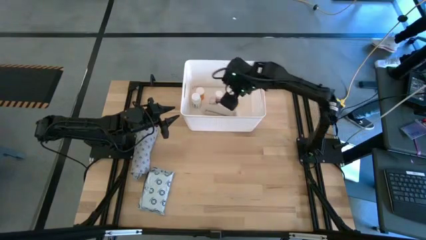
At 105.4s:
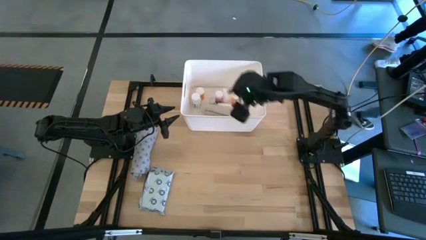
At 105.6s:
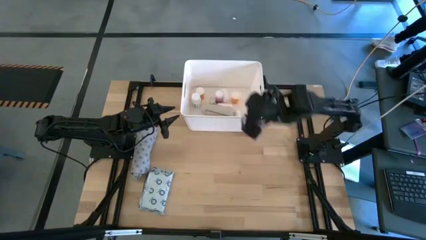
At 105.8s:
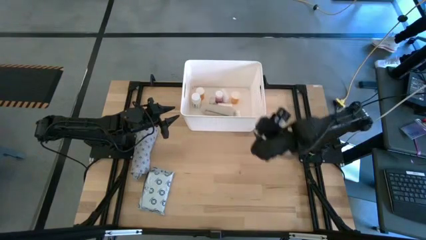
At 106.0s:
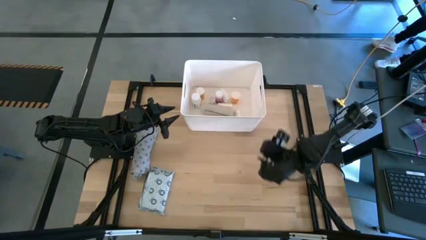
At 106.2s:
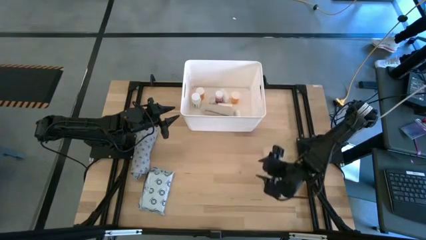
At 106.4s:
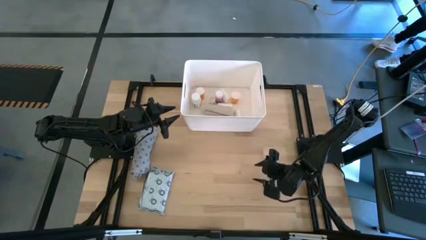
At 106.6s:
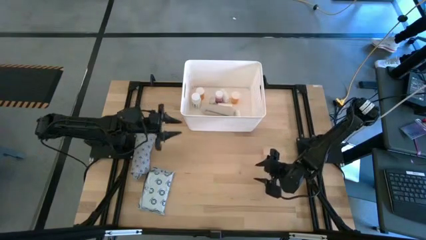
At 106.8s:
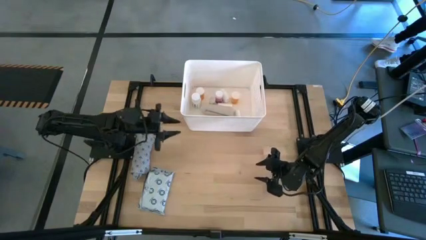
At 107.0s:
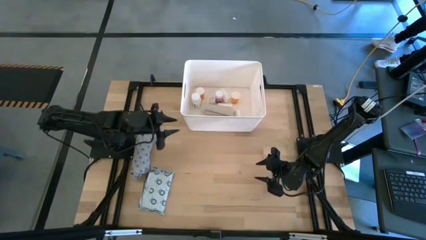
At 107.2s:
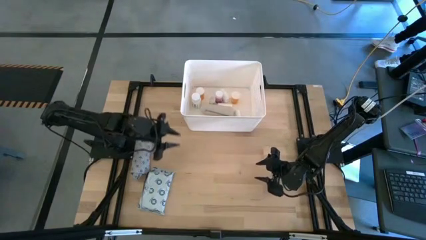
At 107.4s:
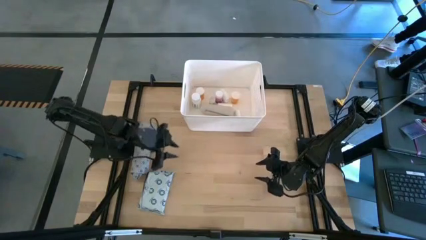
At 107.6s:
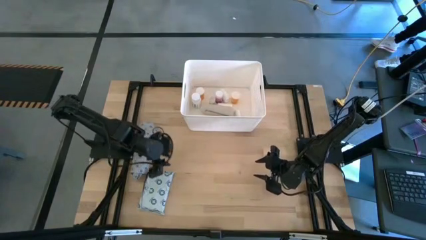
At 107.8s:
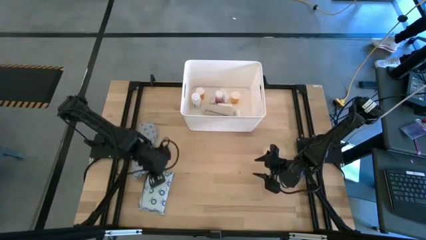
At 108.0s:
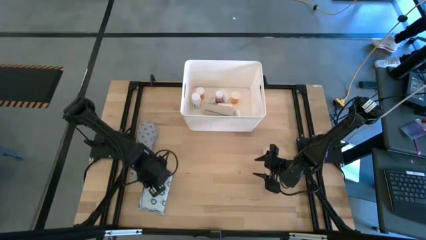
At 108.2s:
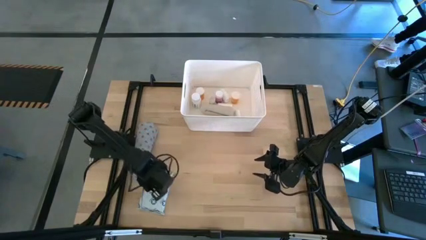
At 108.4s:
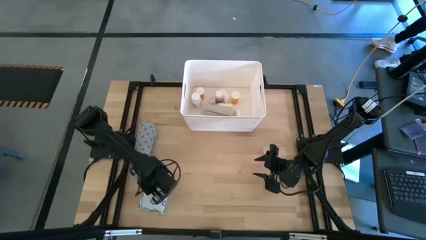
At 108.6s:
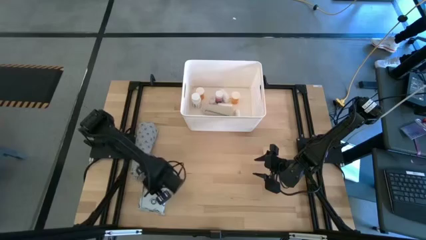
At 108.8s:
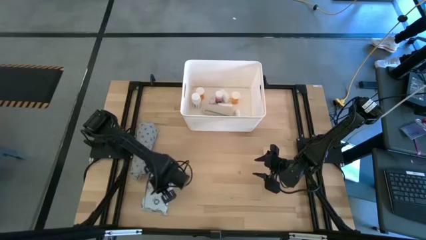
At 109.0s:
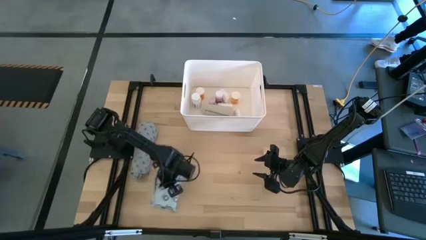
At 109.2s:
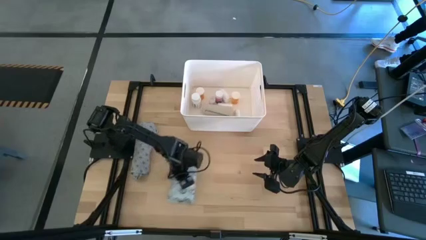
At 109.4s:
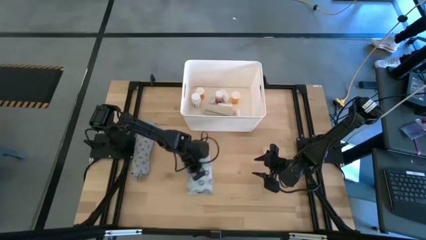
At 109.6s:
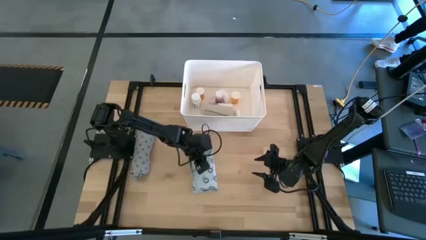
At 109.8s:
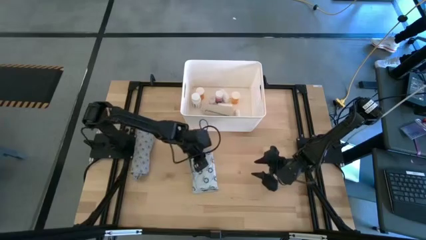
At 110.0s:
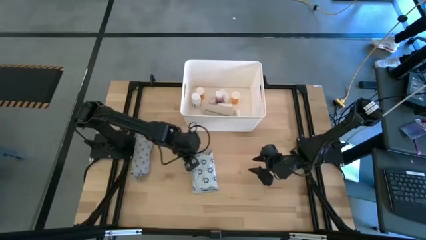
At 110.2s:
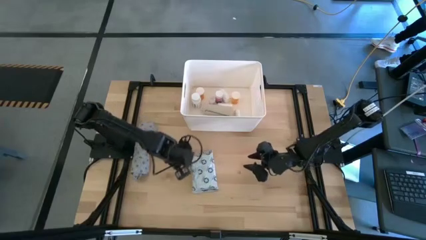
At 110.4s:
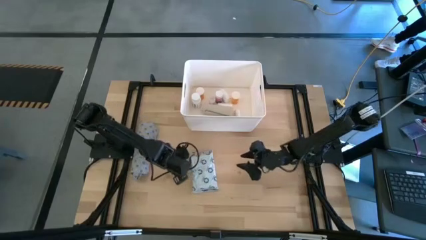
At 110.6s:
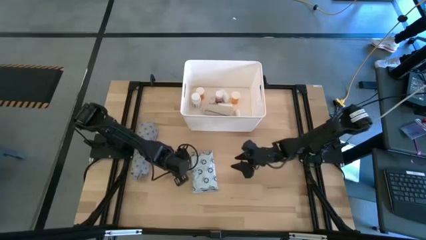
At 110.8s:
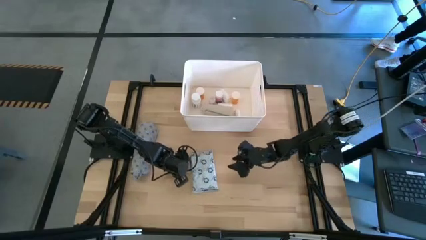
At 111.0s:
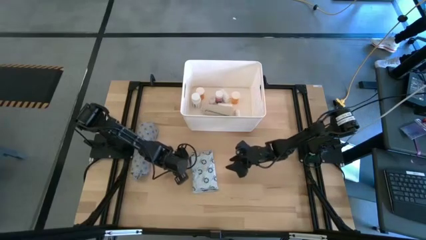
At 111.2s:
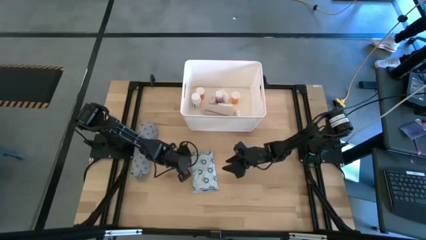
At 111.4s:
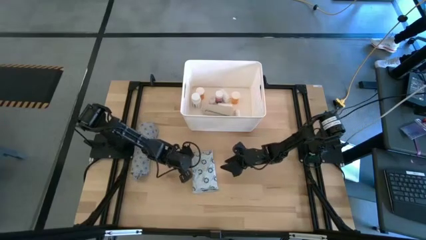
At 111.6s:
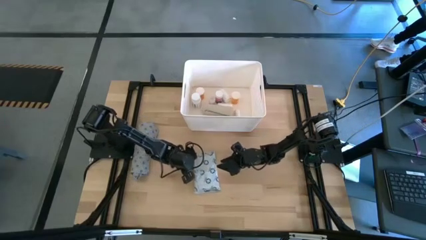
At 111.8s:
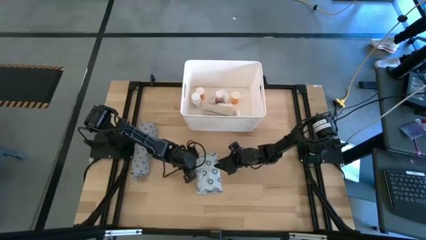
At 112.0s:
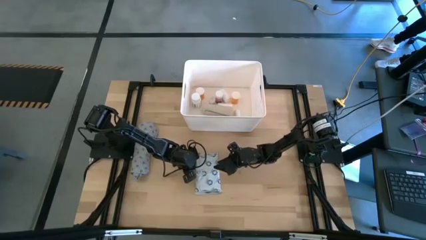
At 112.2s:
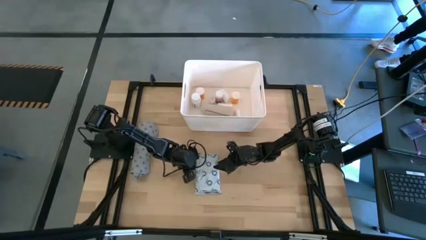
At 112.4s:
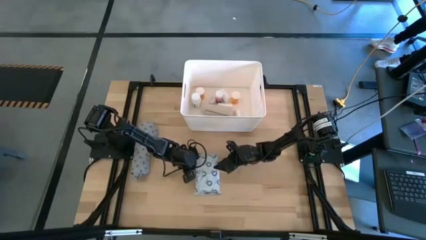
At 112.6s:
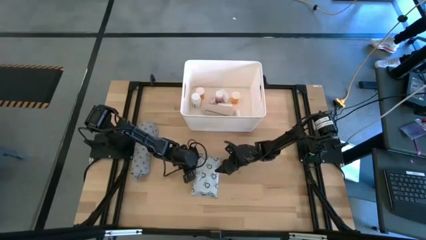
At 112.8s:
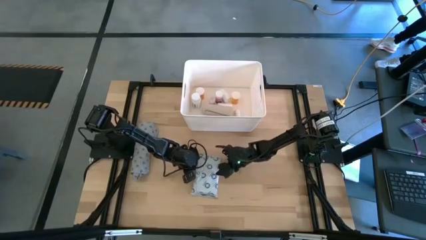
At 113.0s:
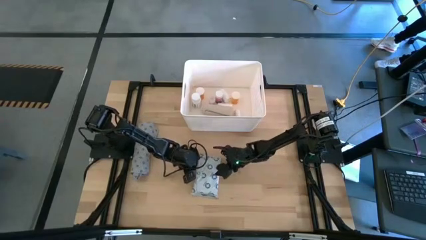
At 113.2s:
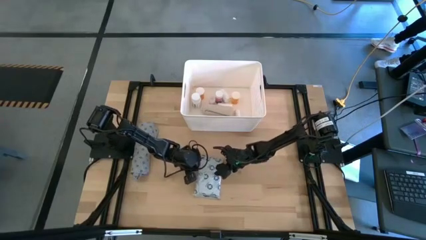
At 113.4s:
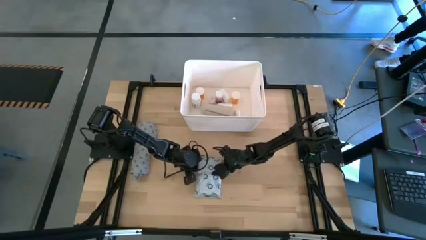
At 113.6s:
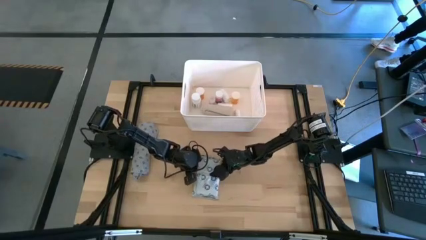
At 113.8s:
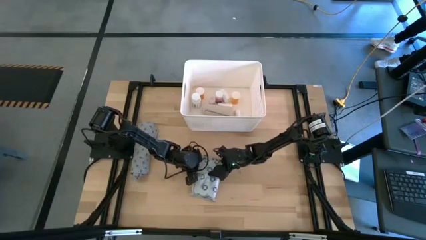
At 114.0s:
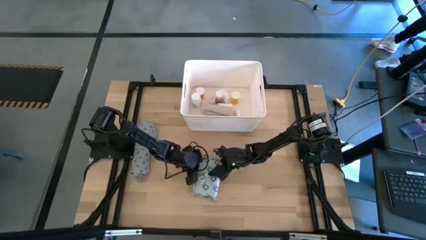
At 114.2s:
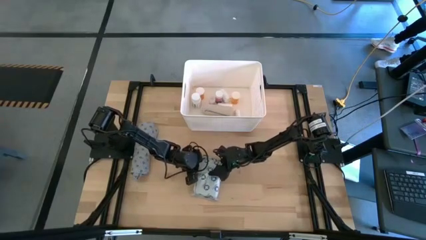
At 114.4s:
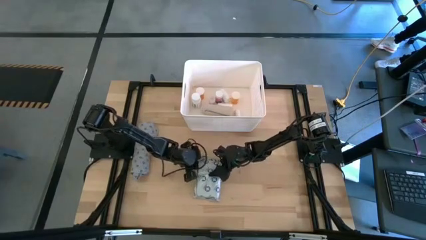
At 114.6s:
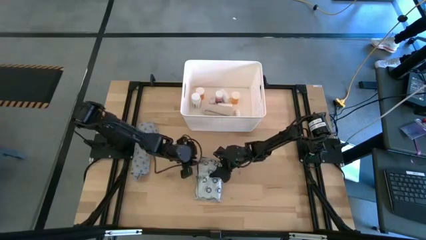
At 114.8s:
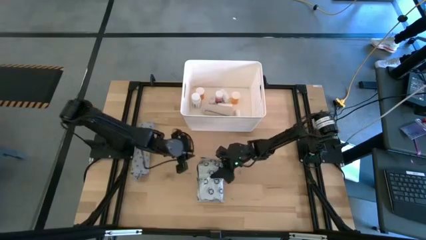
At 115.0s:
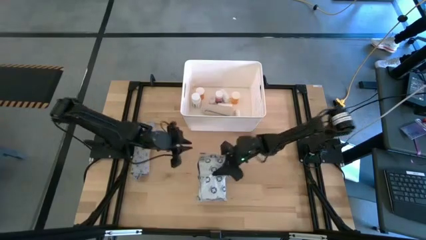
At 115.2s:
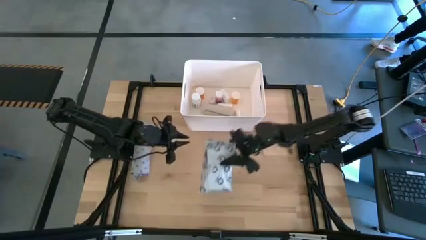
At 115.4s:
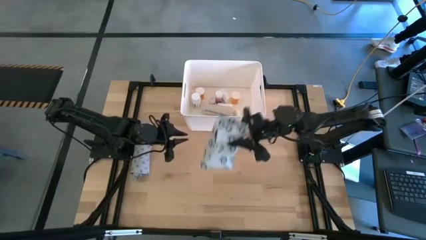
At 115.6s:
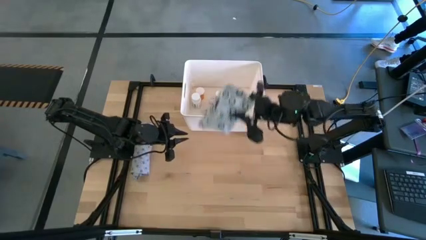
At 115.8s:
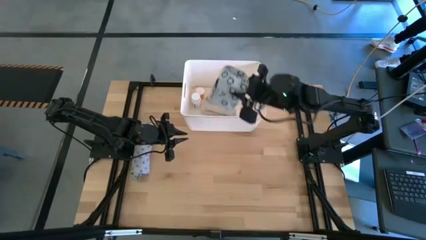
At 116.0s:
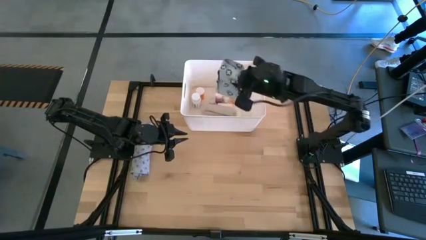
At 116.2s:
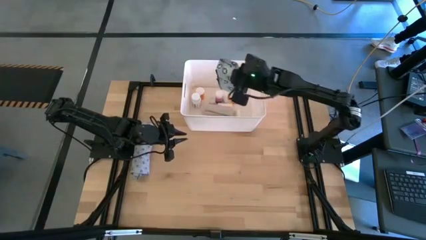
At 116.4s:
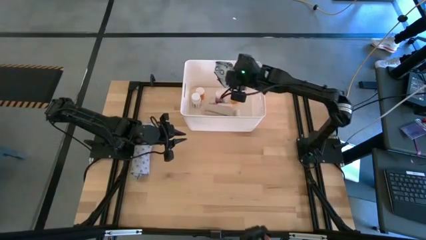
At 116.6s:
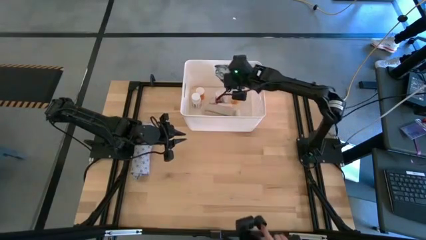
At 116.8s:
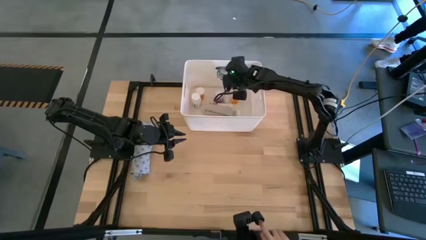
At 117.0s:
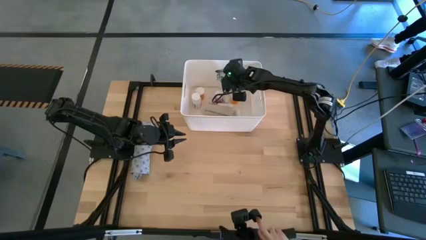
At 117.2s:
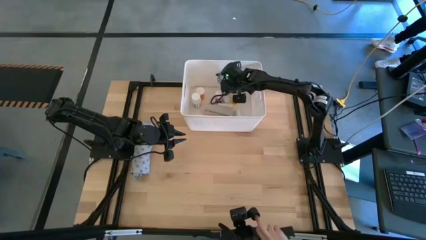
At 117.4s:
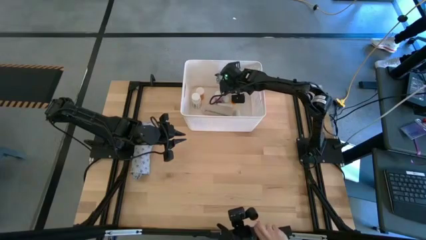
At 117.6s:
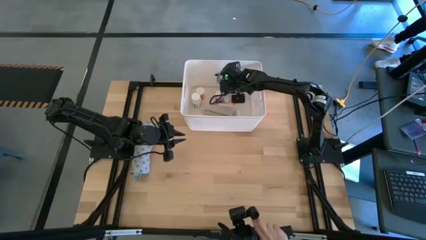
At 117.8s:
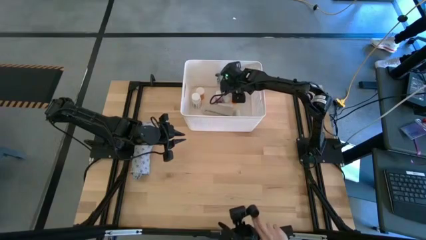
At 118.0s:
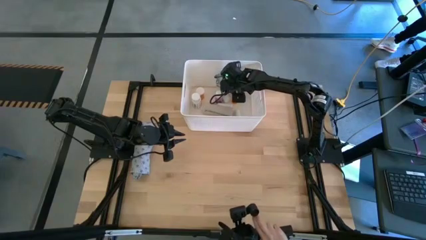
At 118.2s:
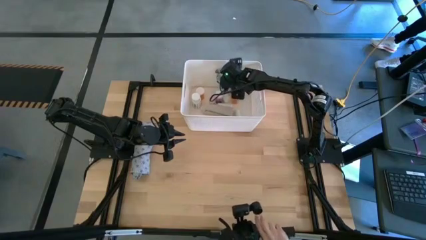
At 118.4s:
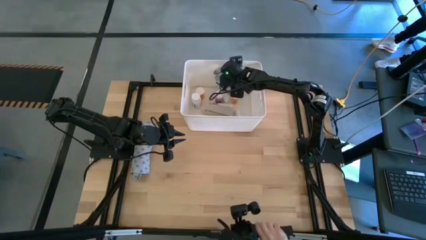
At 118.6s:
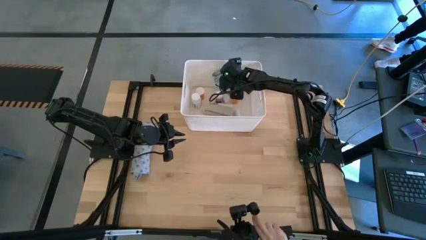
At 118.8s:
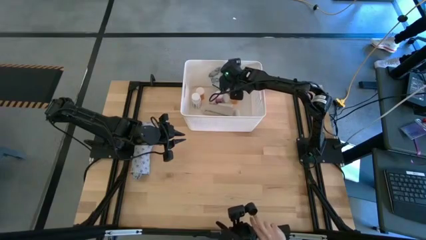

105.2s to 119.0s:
Task: Pick & place medical supplies in basket/bin
Put the white mailer bag into the white bin

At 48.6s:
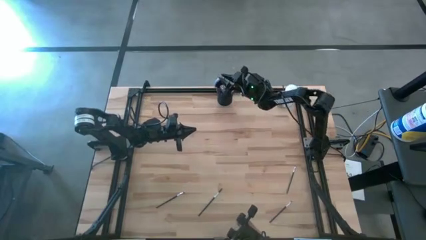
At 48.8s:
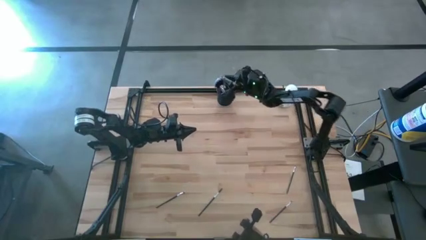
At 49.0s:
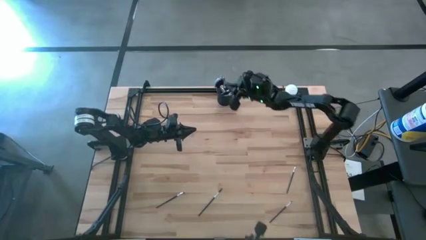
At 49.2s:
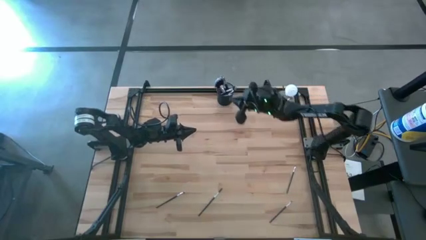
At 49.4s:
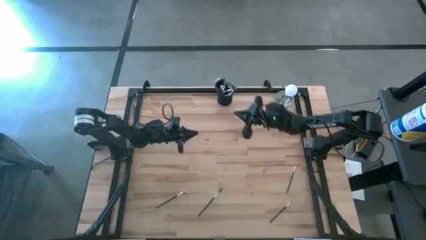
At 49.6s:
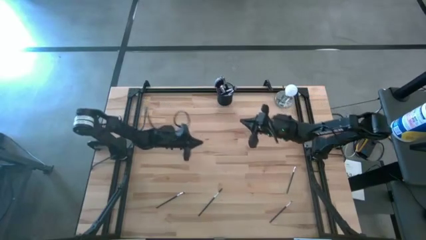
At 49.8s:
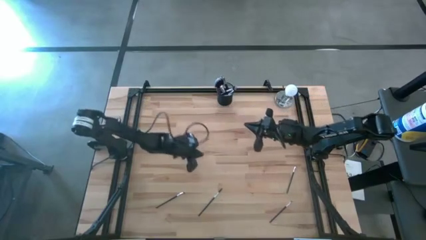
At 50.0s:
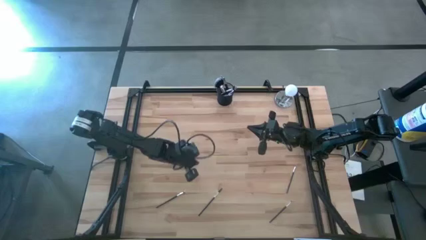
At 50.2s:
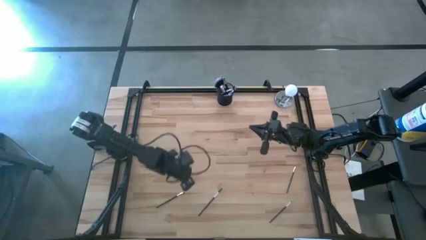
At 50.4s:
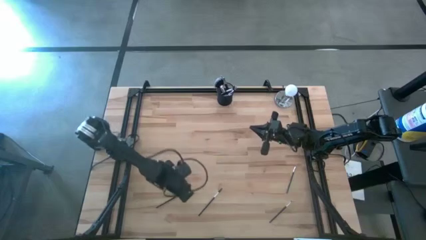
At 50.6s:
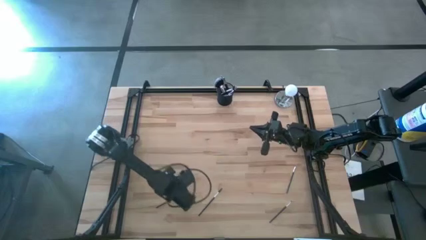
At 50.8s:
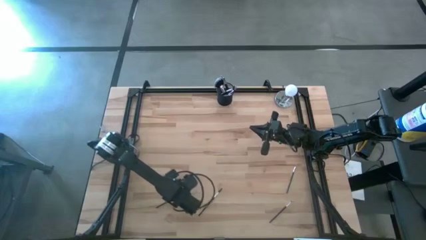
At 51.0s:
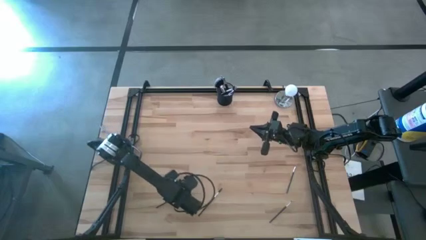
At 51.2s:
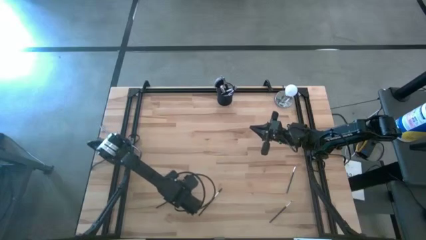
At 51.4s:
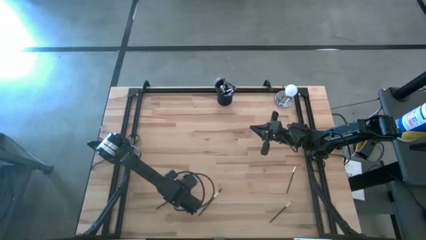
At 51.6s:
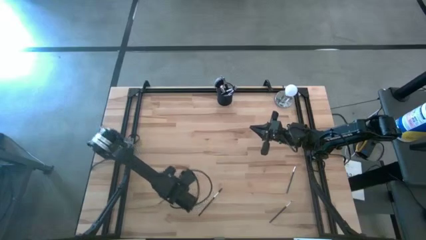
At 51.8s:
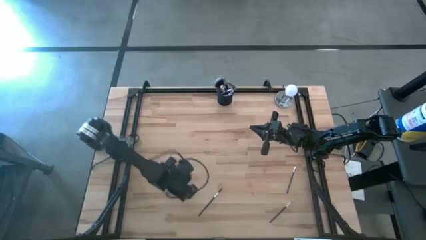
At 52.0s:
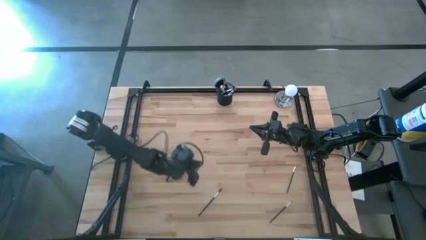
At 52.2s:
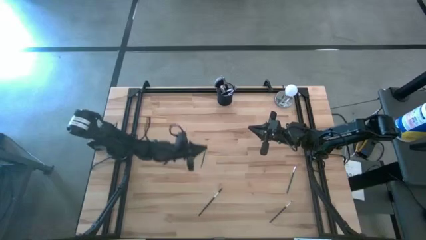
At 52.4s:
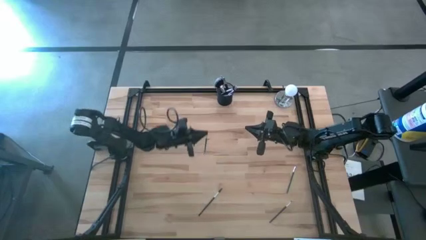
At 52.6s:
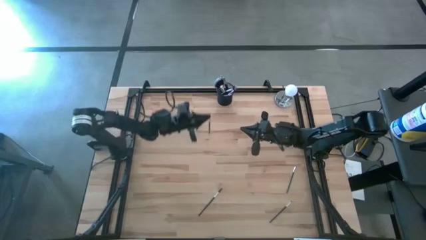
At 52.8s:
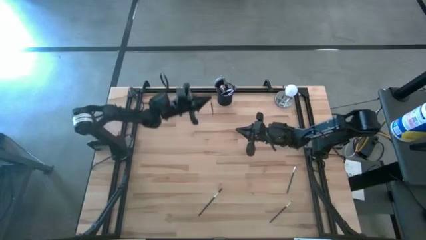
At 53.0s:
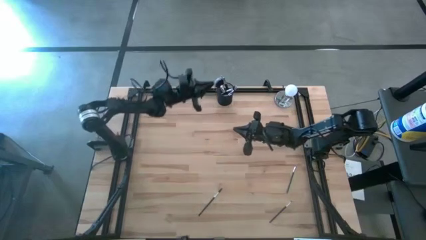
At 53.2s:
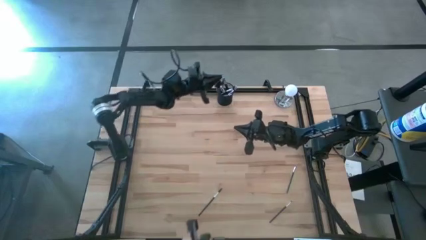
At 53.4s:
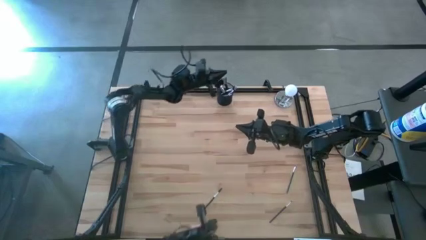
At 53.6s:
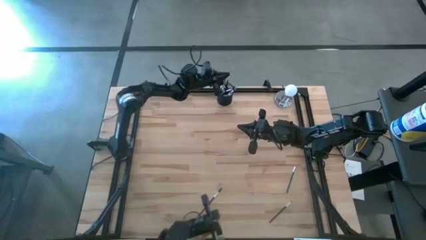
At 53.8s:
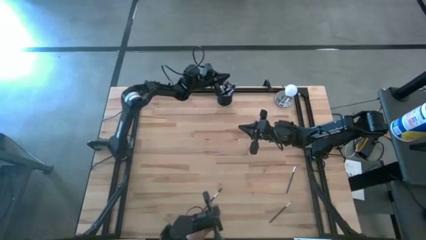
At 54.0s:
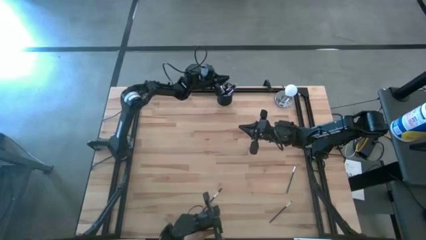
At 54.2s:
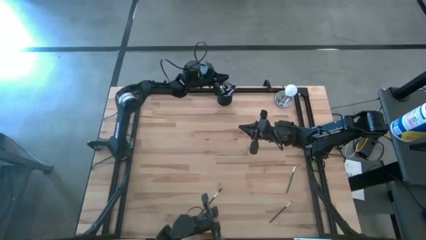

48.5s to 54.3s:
Task: Put items in baskets/containers
Put the black eyeshadow brush into the black pen holder
